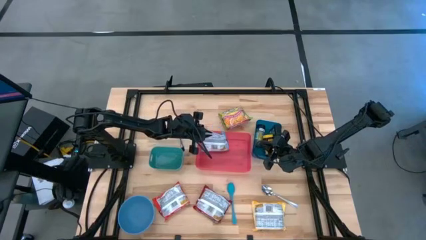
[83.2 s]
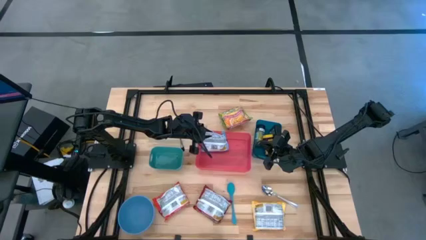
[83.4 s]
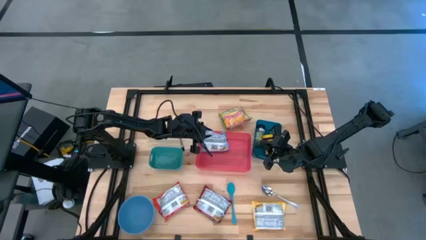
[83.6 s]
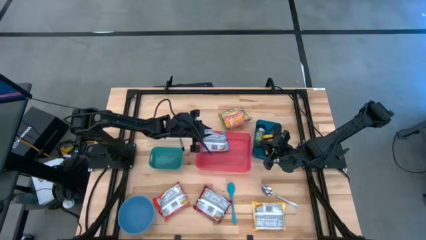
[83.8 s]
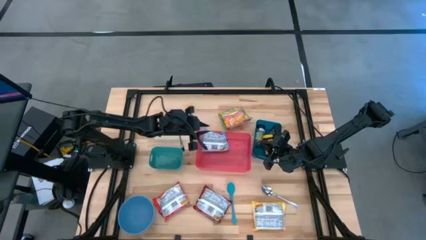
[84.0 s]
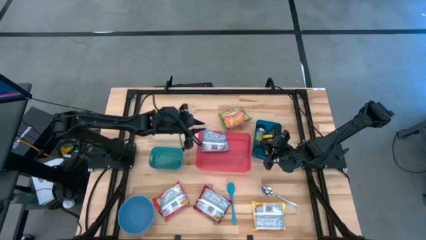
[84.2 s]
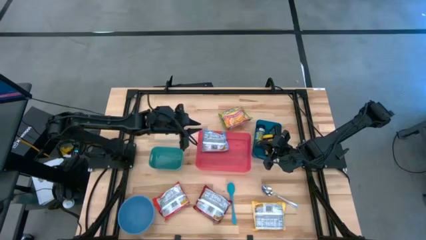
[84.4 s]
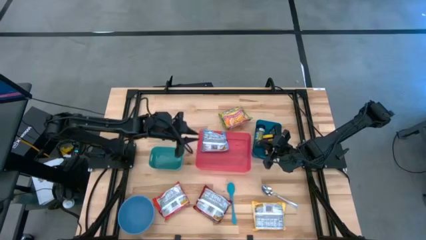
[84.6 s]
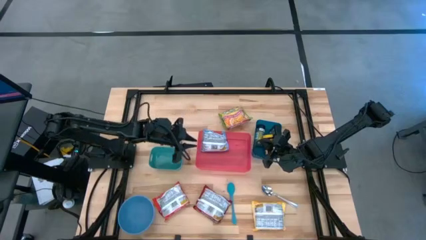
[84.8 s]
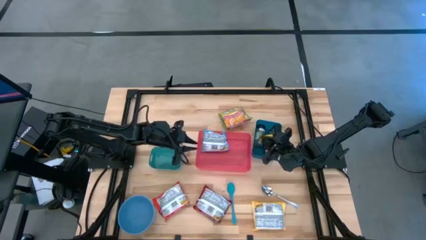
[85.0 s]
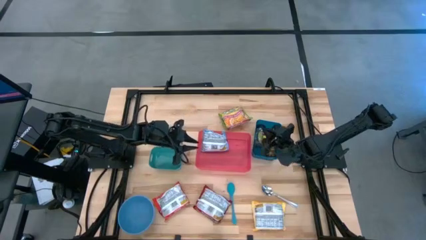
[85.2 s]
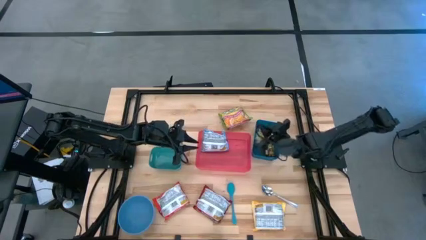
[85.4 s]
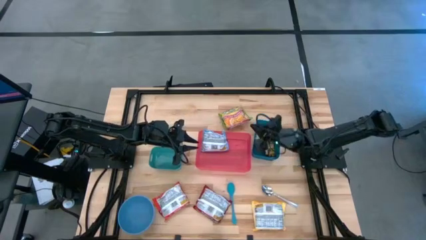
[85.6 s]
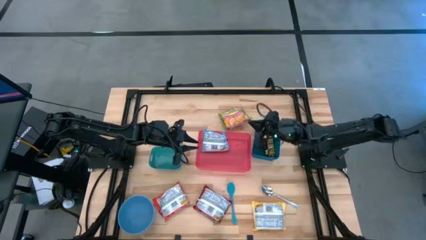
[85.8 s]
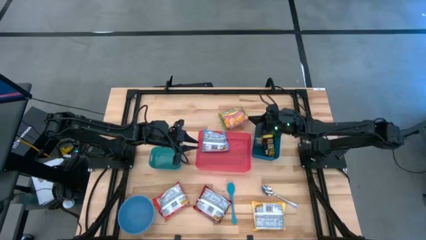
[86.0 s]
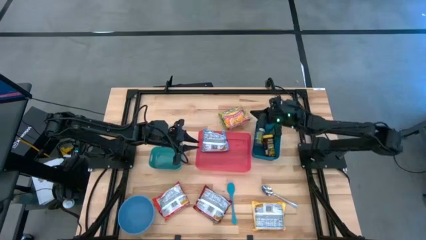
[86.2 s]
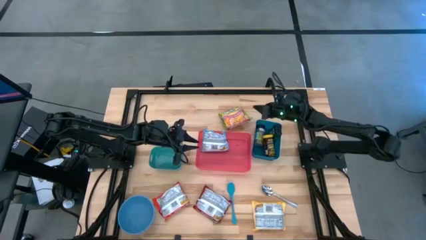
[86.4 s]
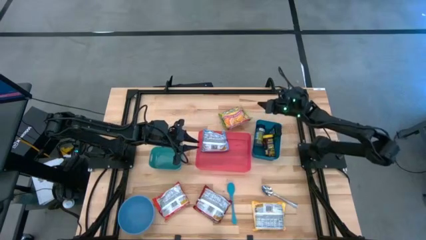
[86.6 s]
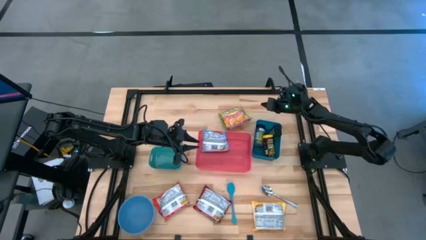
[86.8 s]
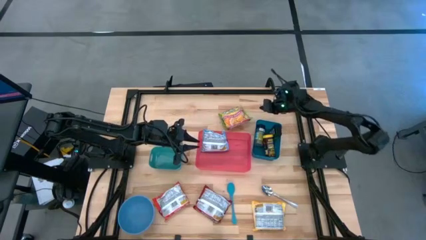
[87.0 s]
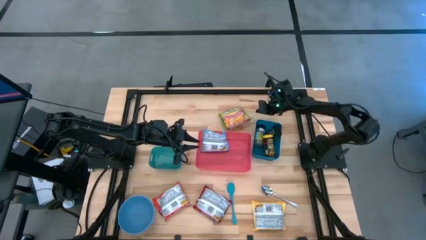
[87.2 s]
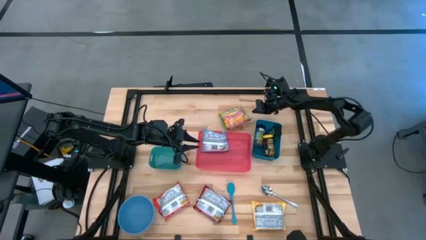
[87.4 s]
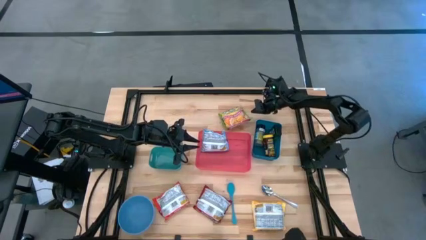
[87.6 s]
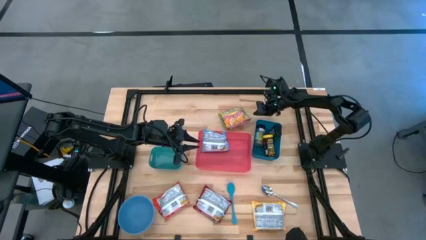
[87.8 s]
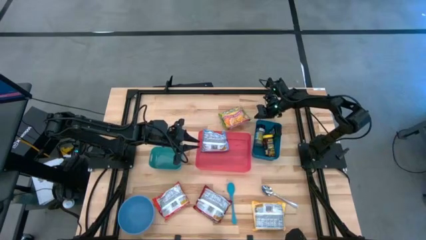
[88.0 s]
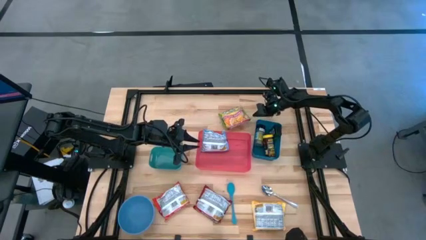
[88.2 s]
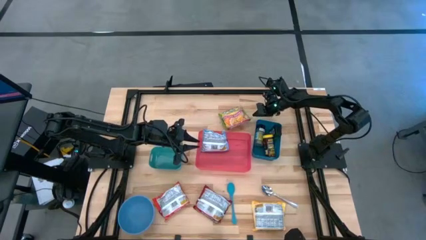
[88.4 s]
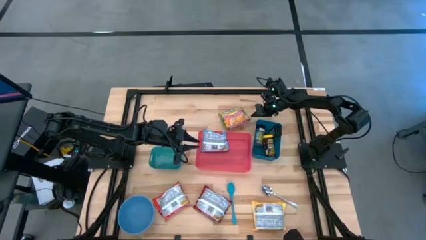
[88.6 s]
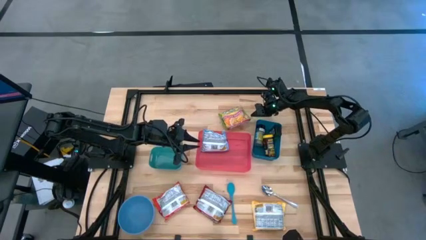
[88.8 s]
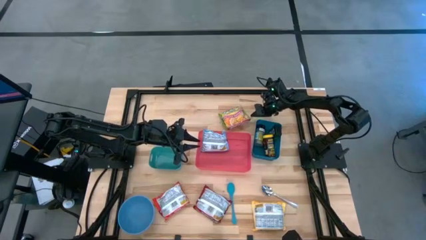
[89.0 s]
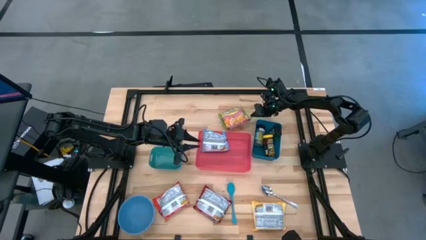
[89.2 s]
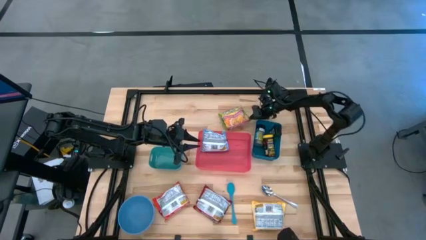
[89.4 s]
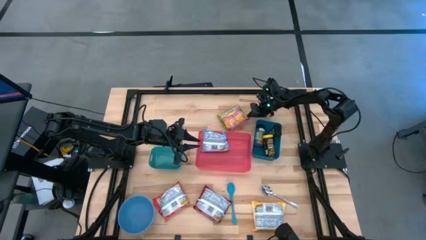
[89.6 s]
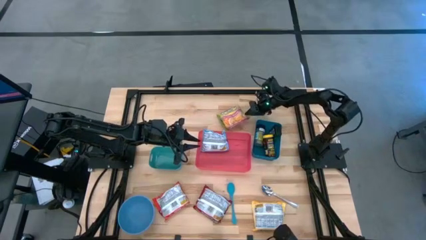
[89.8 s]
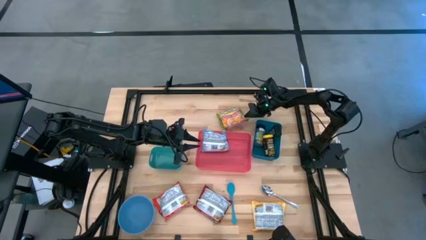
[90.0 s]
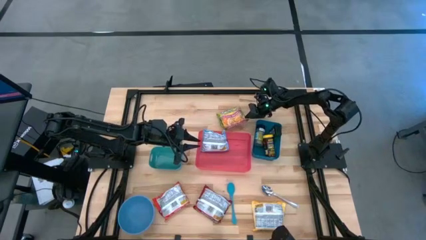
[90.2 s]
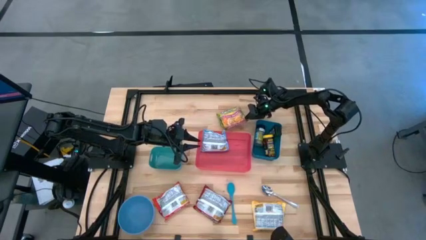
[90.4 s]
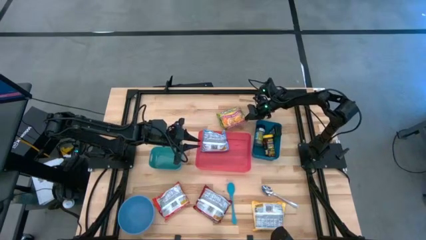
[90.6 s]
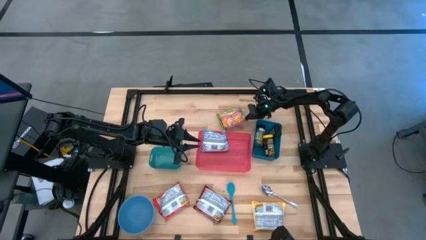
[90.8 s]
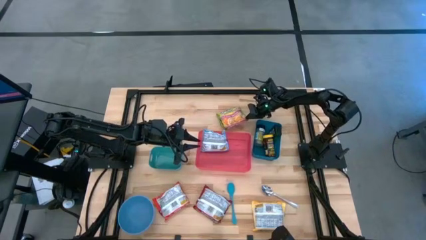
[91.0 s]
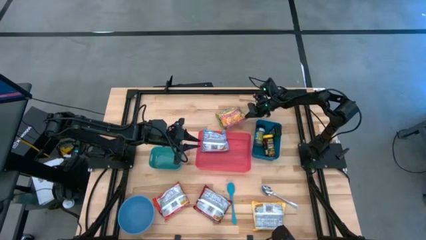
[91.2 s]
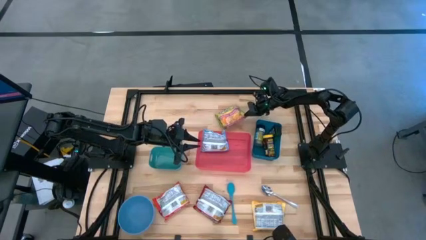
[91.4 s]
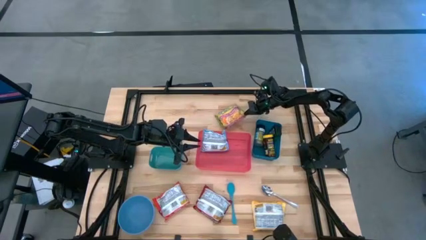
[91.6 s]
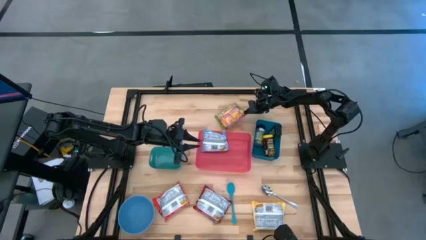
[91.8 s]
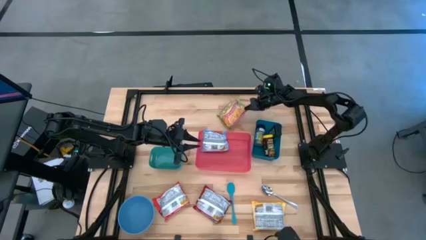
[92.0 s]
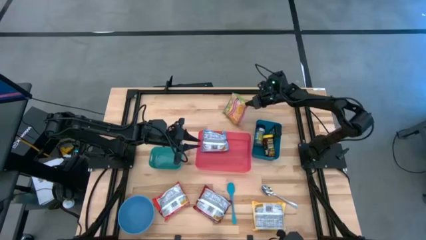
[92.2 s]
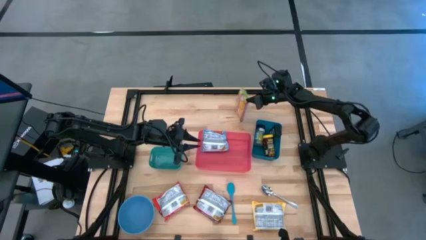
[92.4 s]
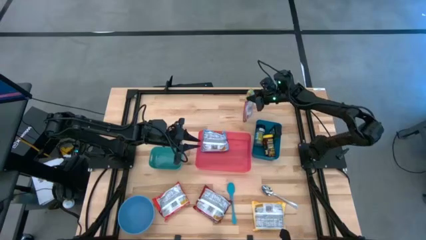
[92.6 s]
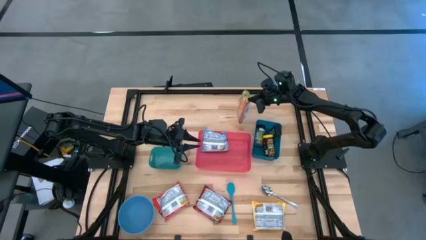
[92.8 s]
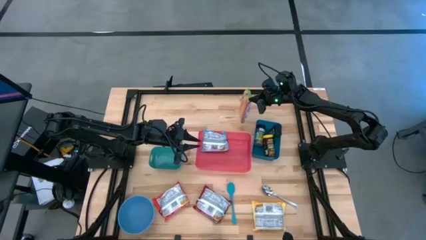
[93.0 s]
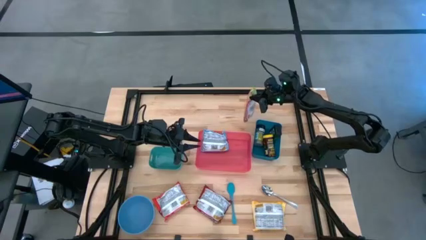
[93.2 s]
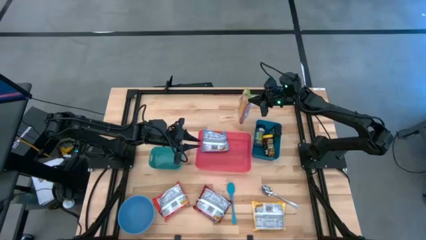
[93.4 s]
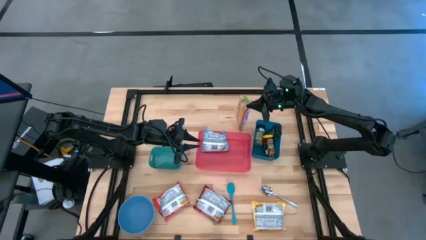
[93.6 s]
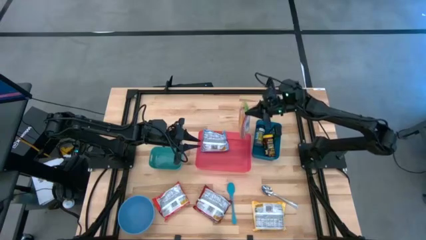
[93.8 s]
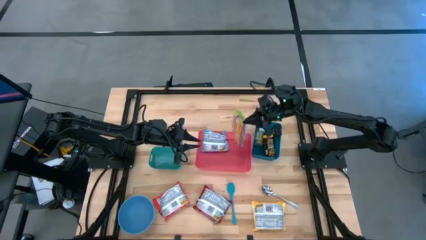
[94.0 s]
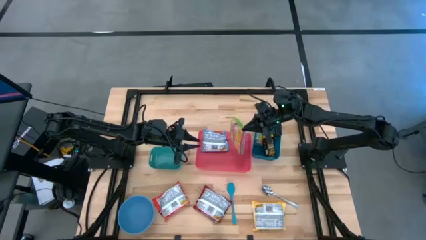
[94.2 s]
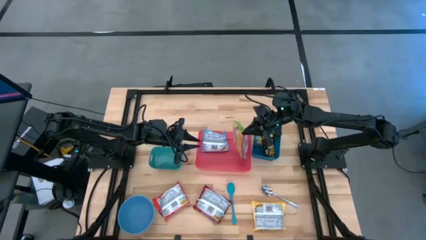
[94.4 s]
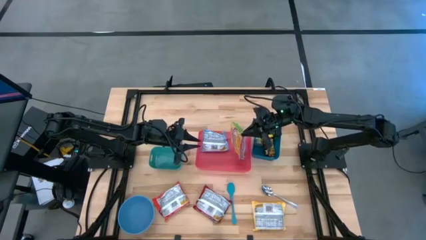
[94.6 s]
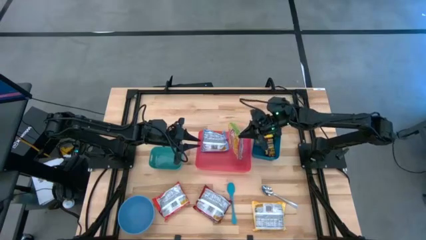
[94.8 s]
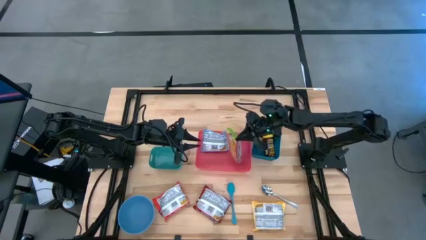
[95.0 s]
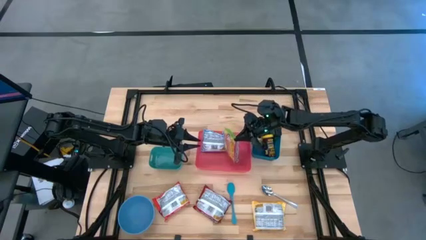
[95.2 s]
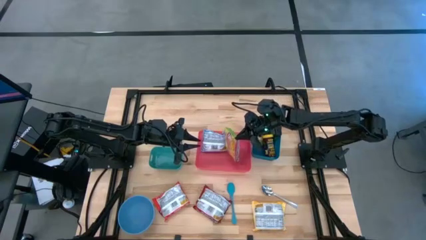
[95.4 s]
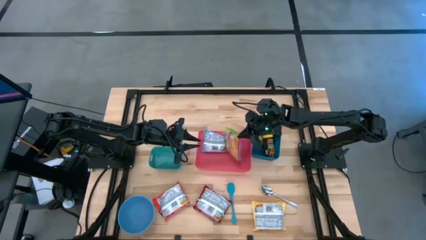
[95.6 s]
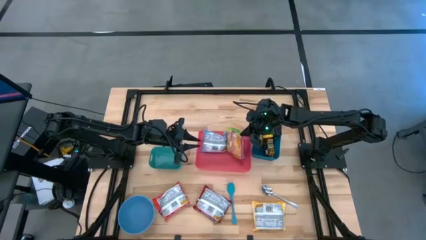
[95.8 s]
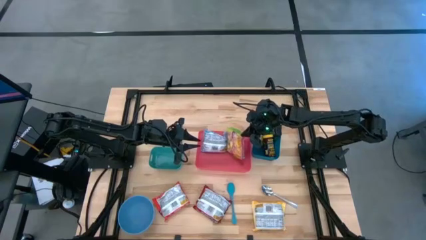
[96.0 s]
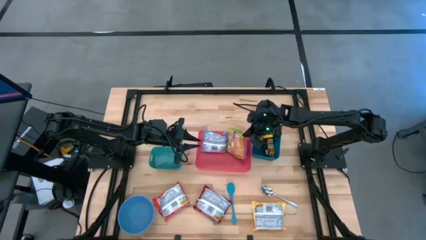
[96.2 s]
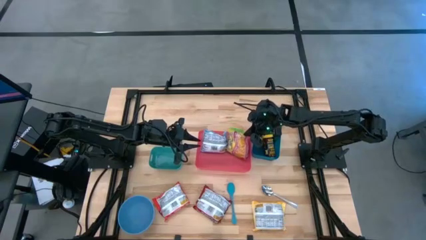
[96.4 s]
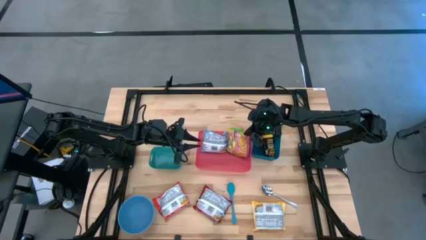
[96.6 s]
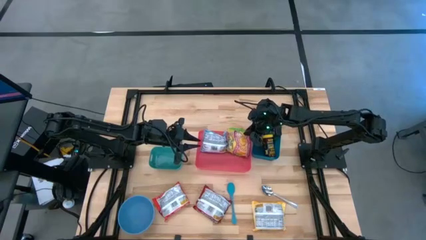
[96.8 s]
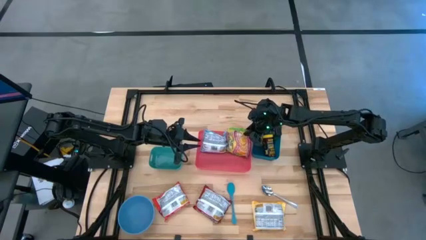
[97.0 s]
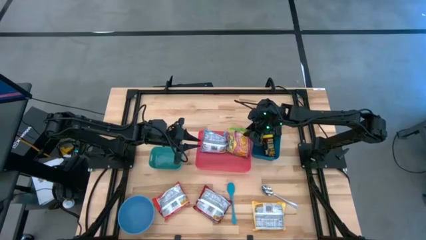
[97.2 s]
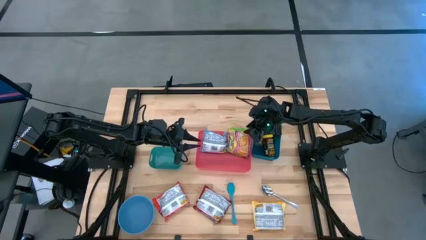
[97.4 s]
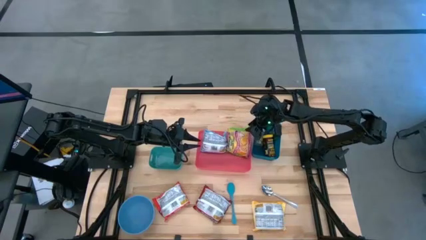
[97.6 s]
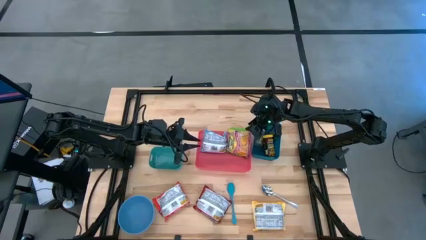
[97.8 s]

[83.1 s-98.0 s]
Task: Pick & Place Food Item
Put the green noodle pack into the red bin

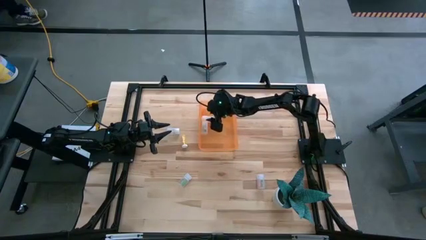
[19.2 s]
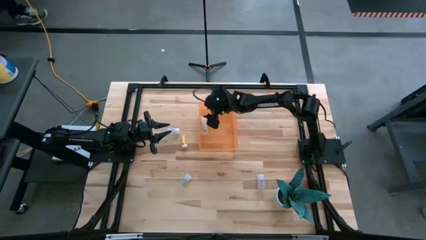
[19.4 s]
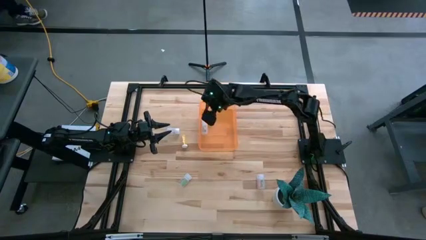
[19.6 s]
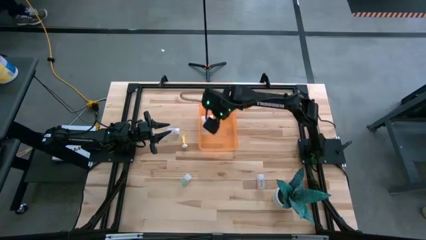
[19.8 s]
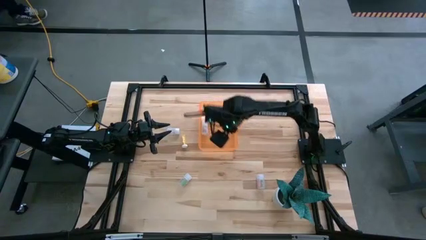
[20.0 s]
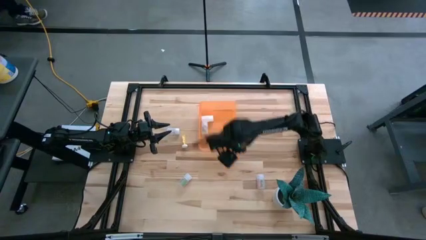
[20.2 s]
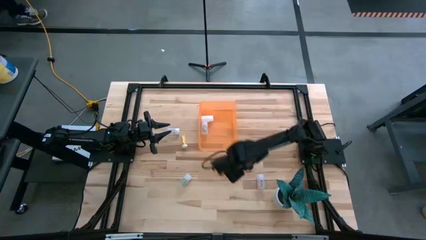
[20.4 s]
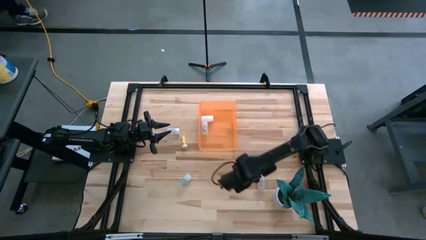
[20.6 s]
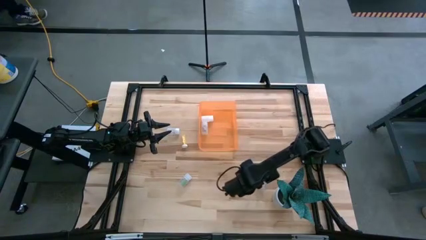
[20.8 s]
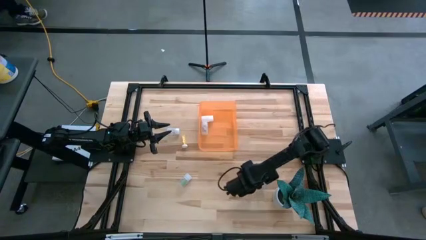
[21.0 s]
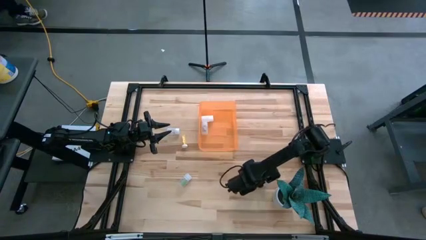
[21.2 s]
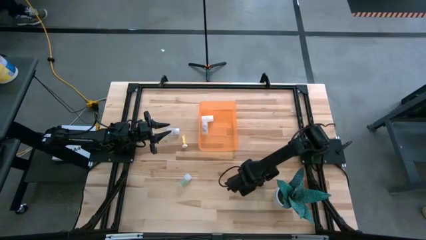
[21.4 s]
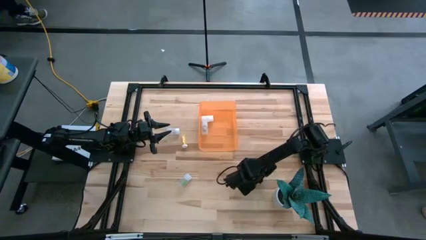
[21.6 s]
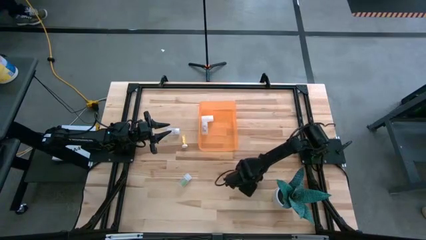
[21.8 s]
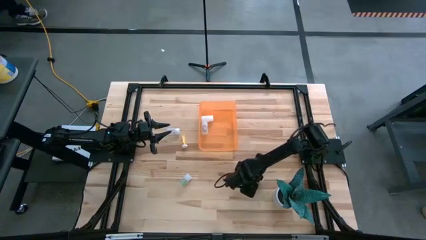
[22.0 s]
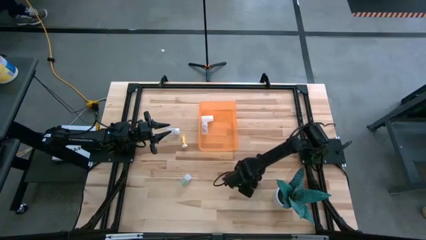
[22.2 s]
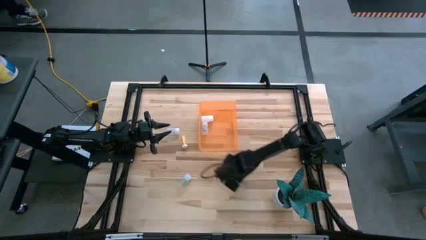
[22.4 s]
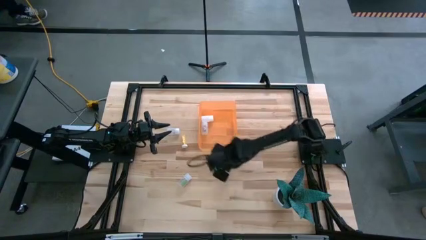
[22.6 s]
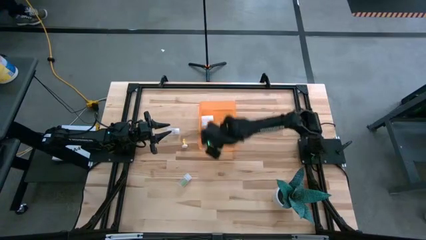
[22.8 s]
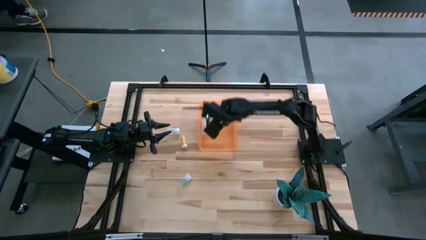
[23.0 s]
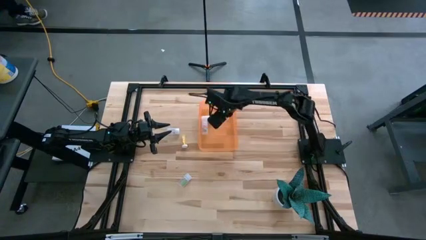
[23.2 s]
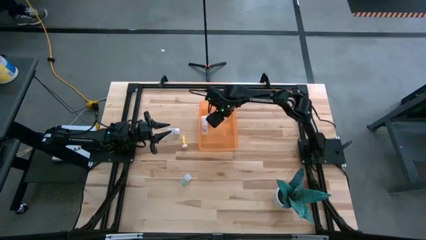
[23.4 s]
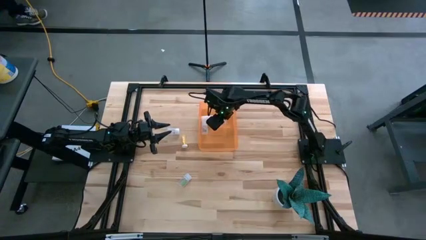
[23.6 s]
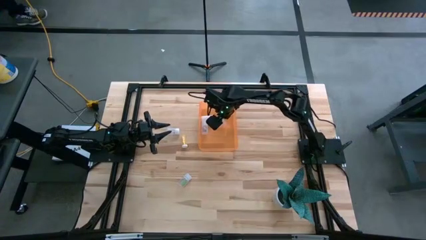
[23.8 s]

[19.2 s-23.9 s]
Task: Pick and place pill bottles into a basket
Put the transparent pill bottle into the orange bin
